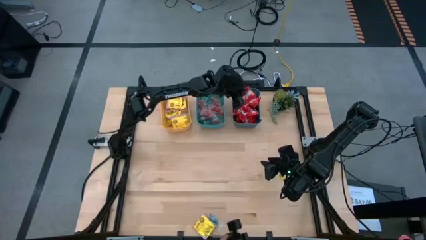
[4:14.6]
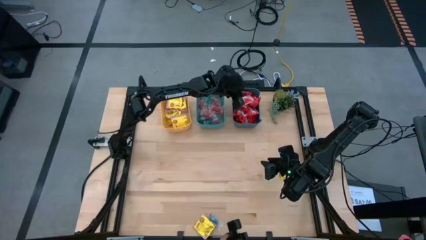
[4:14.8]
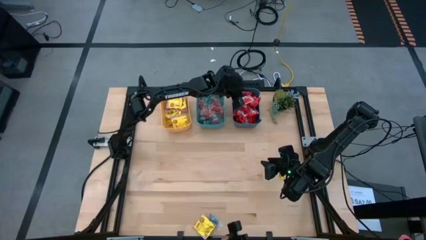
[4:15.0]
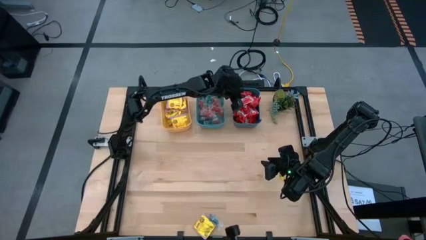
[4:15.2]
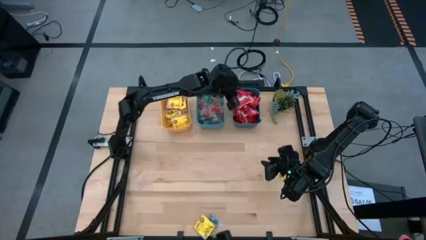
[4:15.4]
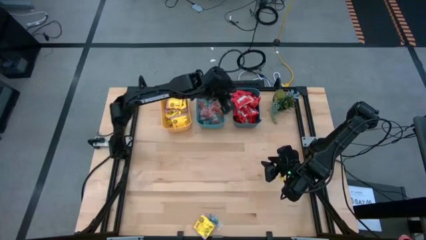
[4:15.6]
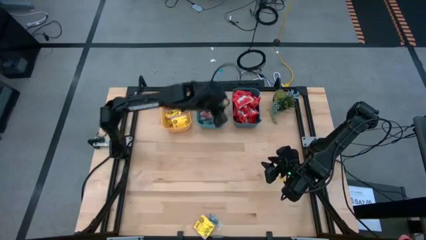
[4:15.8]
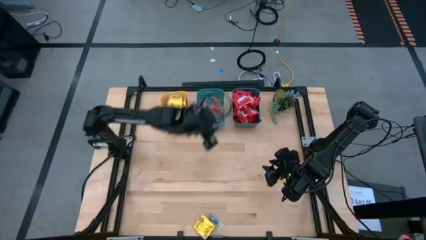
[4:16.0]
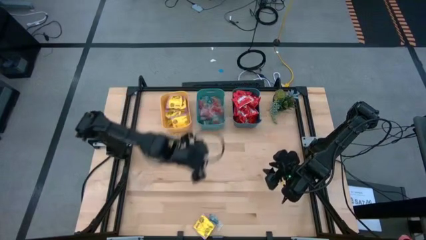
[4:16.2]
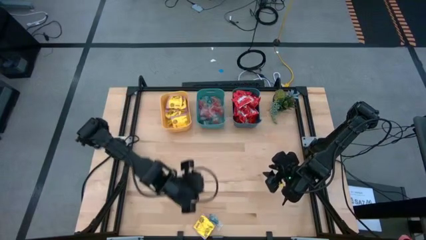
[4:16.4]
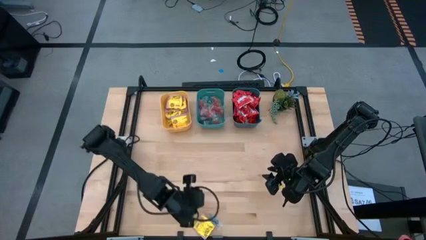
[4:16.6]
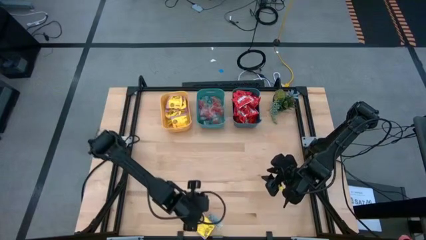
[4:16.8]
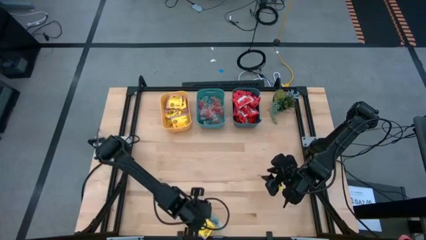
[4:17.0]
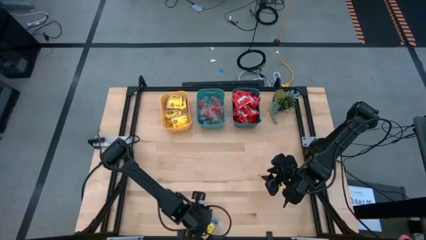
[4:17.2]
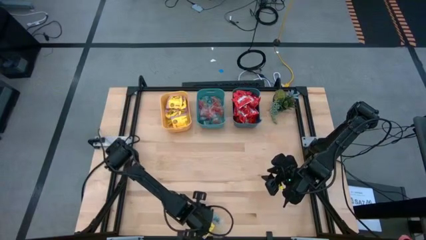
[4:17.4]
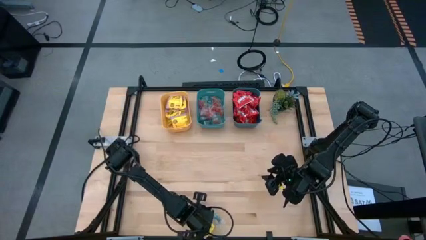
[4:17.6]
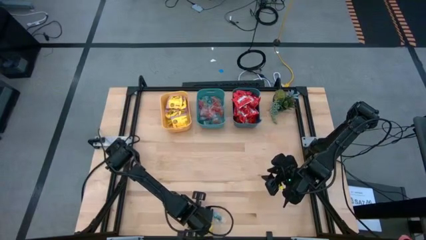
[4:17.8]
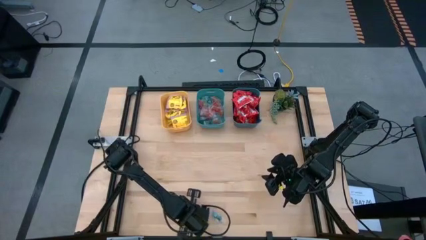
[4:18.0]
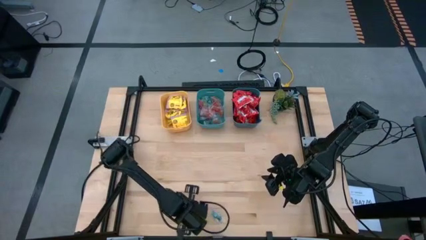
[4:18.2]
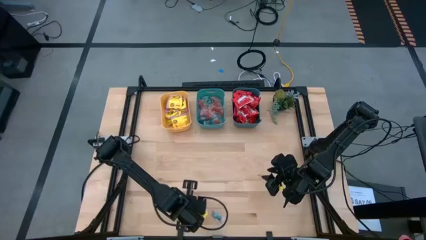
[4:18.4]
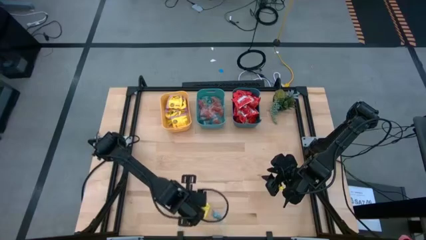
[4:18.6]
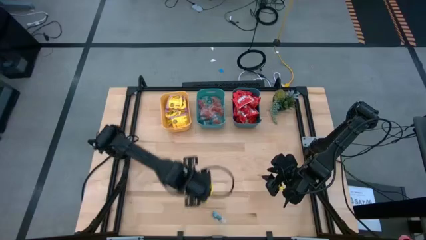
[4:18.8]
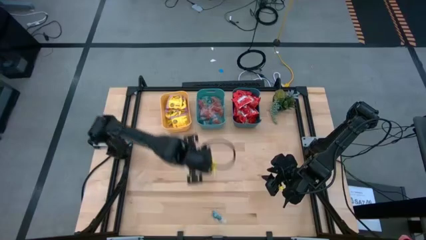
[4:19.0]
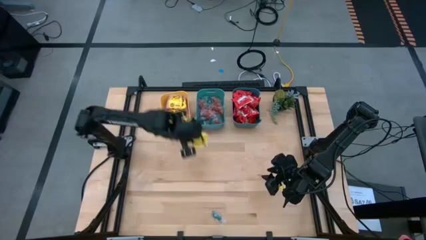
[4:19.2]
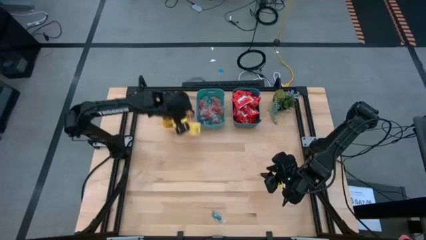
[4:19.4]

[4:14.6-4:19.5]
Task: Sort candy
Put the yellow candy into the yellow bin

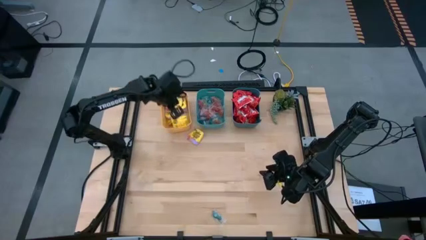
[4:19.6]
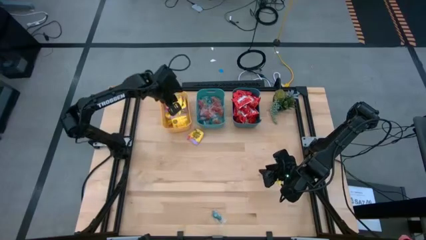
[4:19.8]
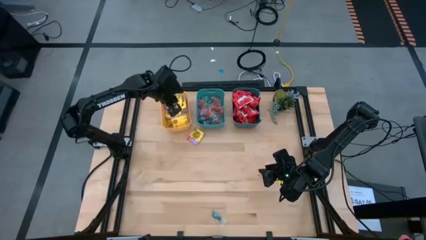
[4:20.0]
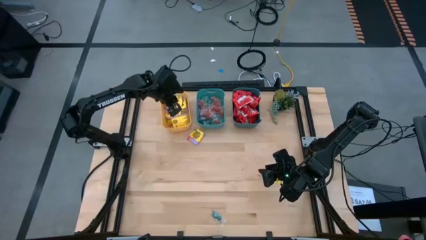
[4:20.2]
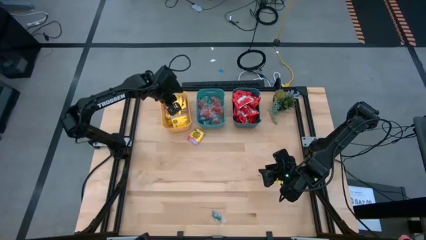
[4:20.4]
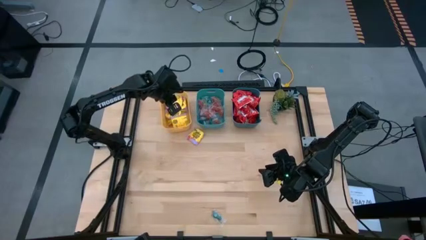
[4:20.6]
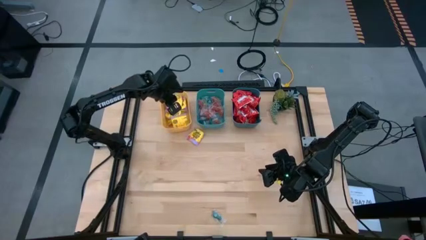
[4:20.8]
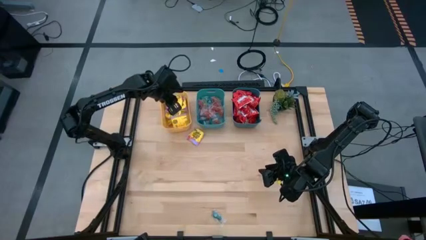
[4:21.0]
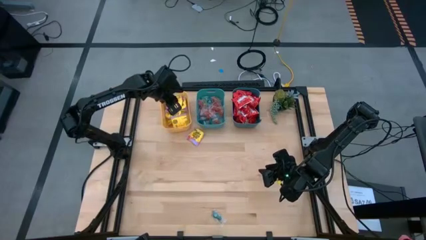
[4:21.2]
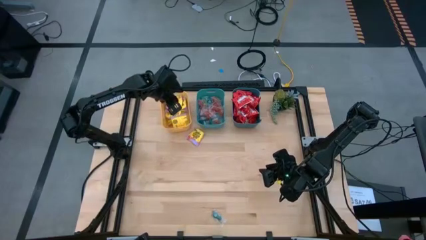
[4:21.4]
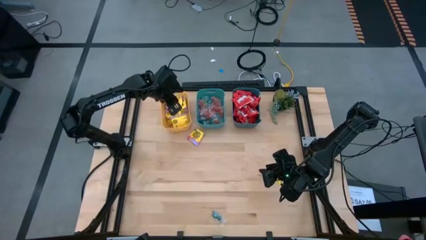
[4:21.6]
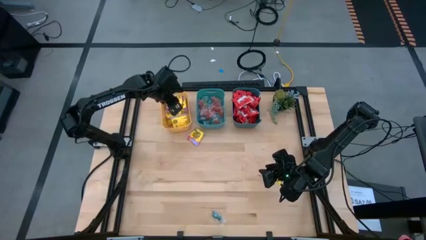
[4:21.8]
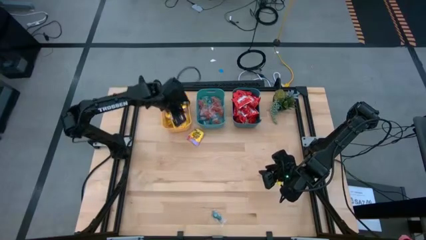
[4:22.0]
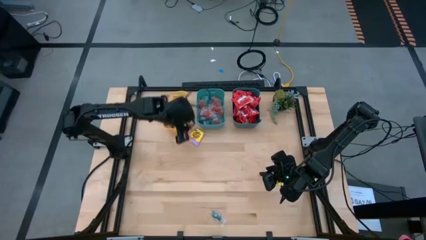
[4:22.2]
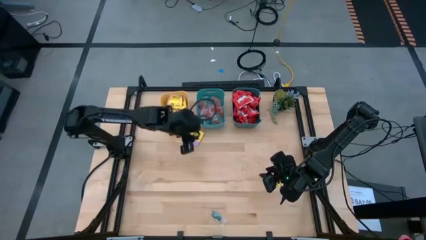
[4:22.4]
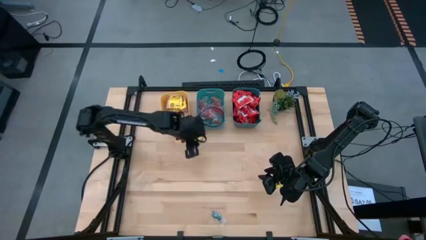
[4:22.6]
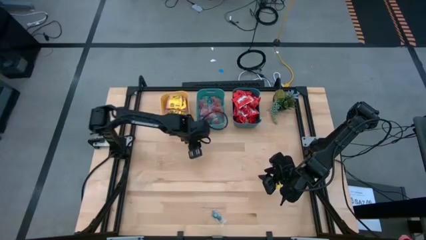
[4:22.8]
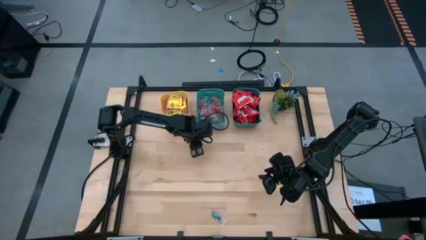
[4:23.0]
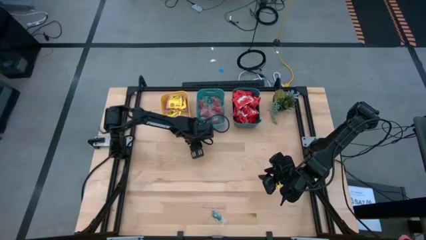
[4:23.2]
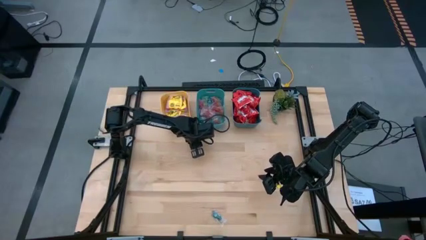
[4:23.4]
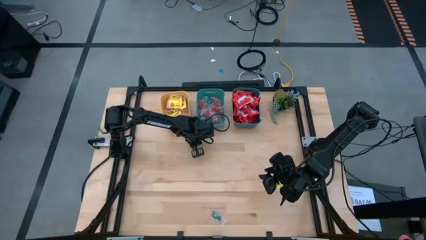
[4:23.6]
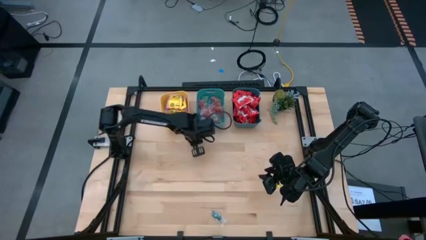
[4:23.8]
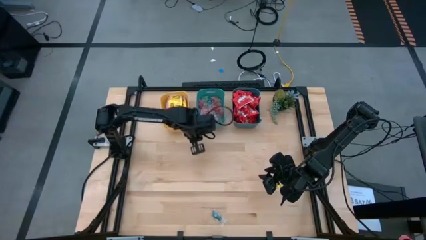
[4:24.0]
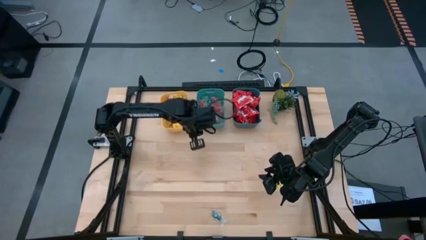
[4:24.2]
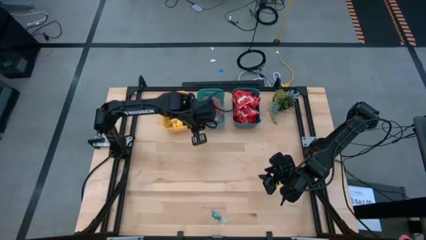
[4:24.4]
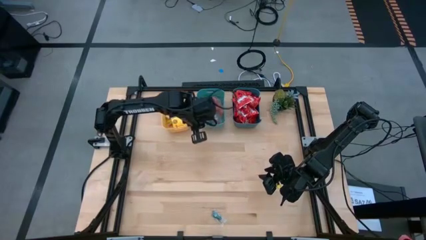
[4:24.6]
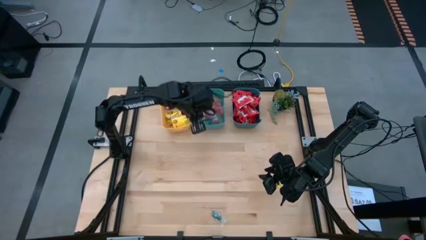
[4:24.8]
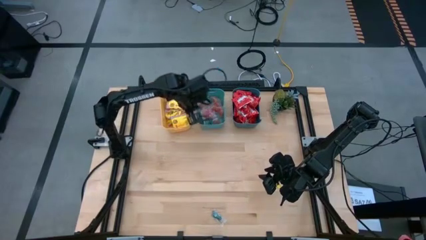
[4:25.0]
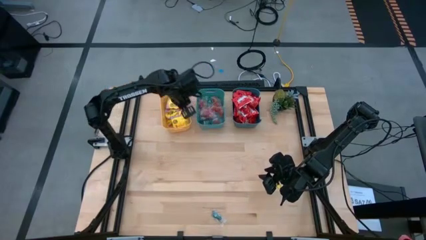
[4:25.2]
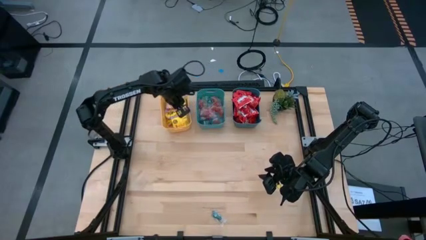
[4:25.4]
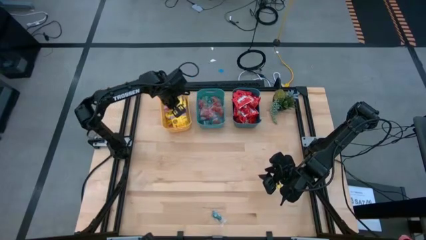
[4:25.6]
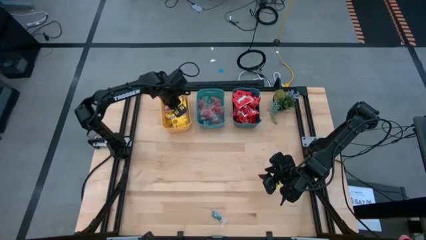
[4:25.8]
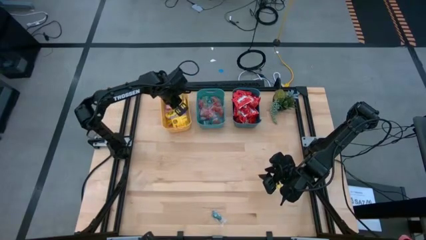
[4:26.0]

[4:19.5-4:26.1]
Put the yellow candy into the yellow bin

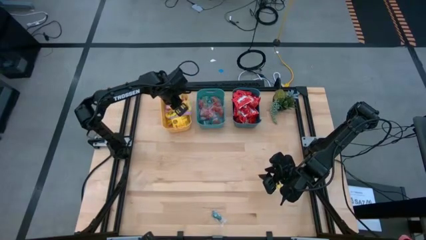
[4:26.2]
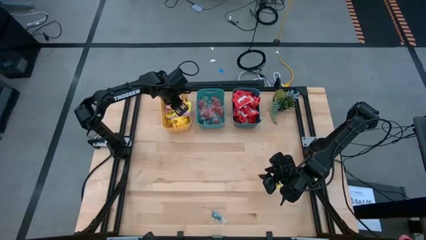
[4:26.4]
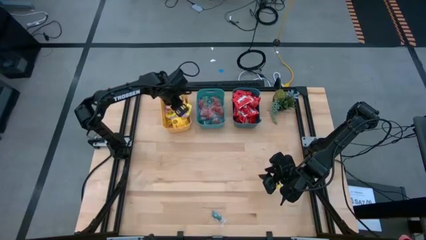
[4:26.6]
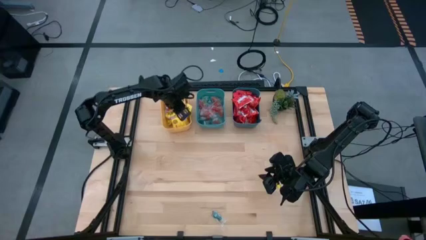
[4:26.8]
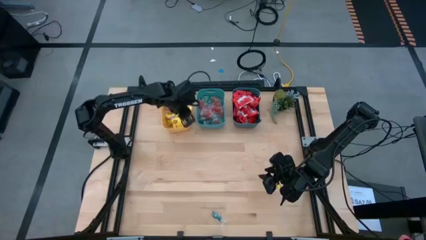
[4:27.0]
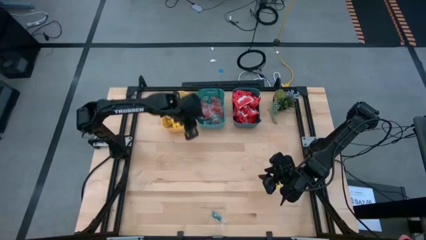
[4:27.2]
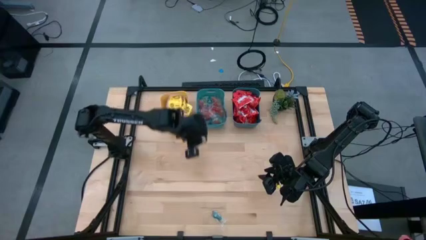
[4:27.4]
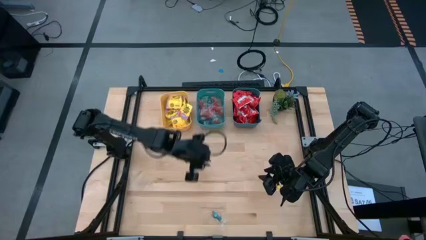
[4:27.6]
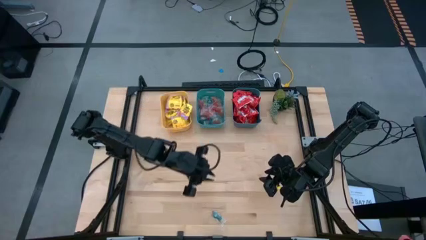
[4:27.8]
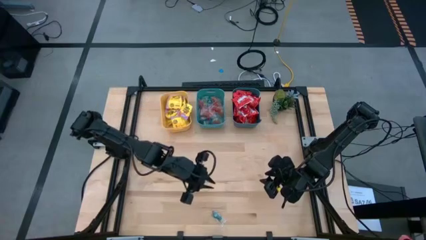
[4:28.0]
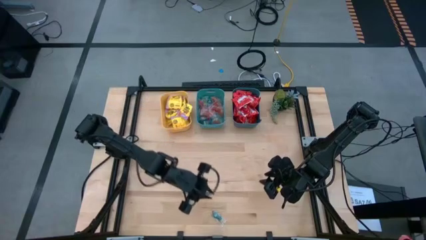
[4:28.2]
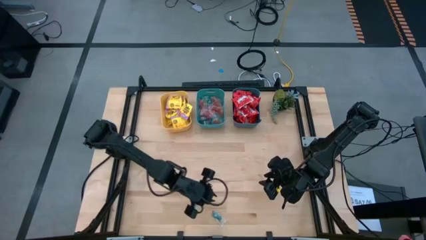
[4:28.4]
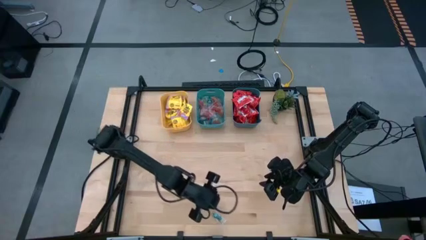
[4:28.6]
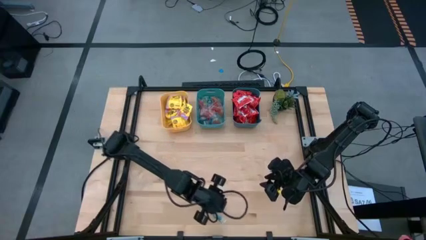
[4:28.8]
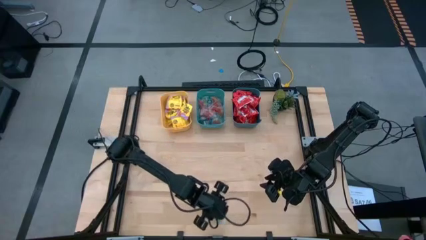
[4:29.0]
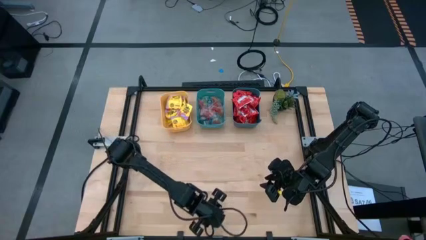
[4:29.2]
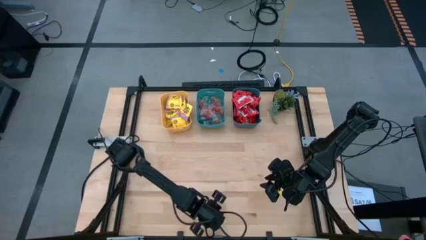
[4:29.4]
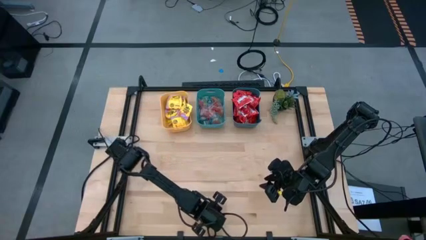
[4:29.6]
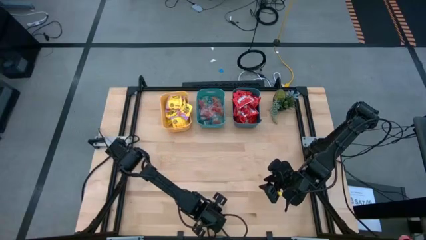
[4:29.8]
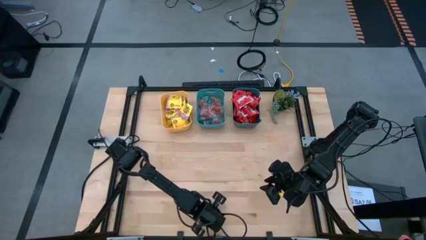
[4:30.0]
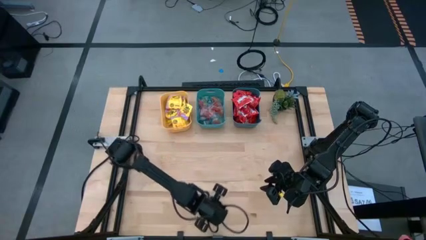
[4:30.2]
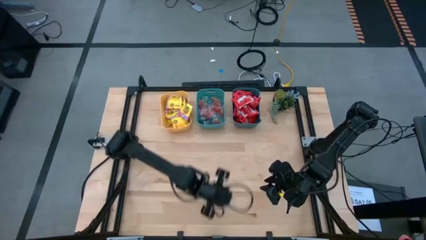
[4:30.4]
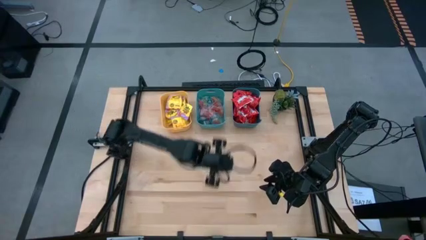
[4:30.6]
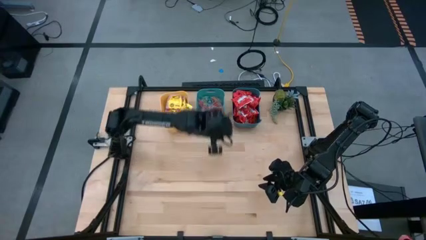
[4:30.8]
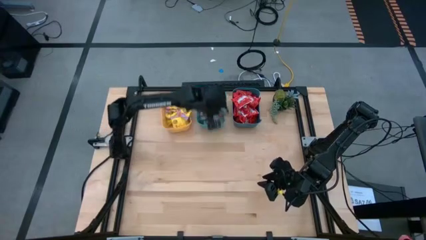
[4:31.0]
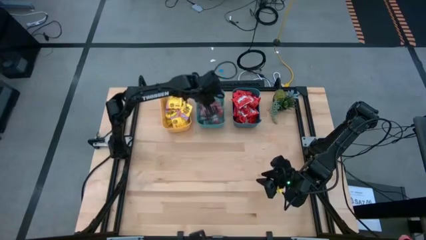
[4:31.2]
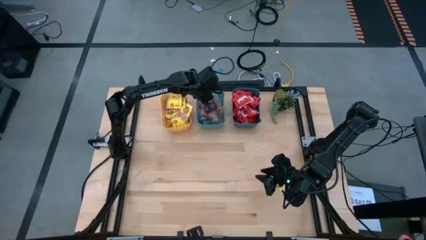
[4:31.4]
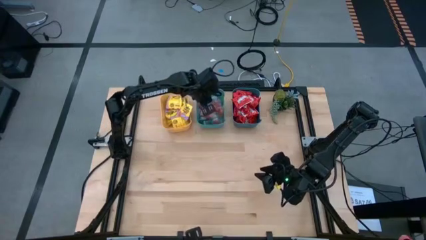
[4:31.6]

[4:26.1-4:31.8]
Put the blue gummy candy into the green bin
